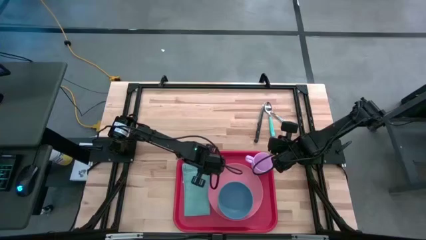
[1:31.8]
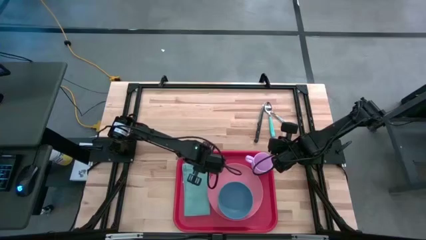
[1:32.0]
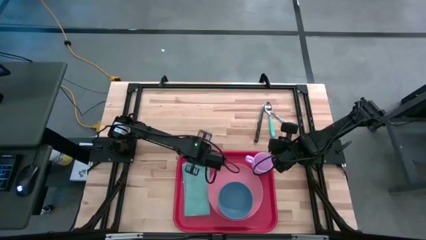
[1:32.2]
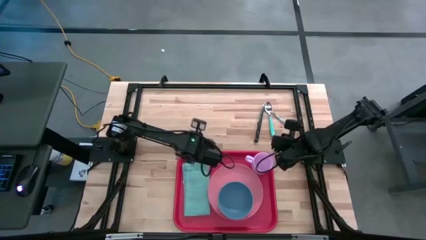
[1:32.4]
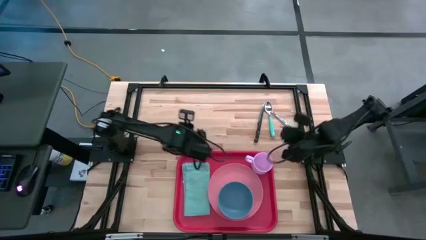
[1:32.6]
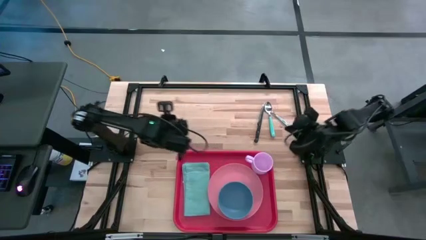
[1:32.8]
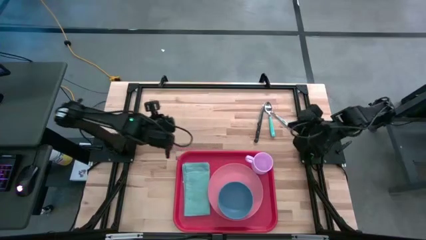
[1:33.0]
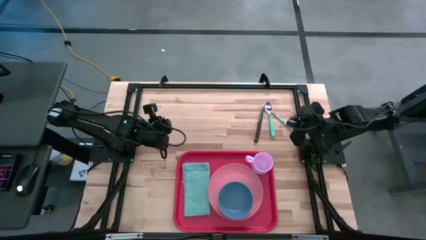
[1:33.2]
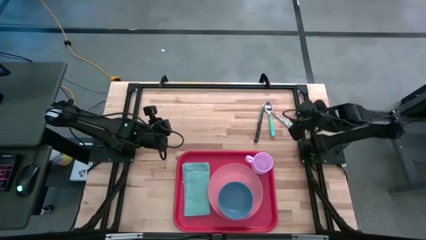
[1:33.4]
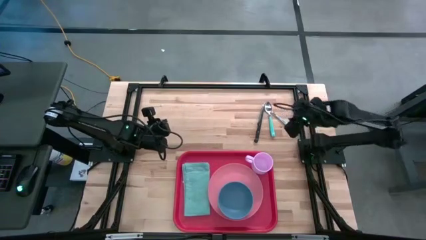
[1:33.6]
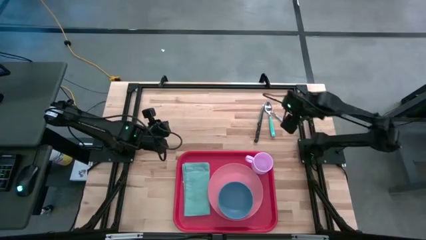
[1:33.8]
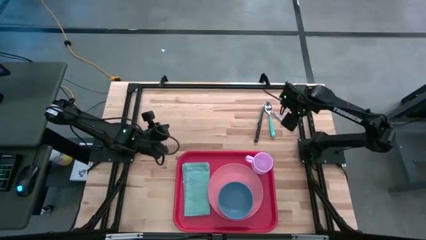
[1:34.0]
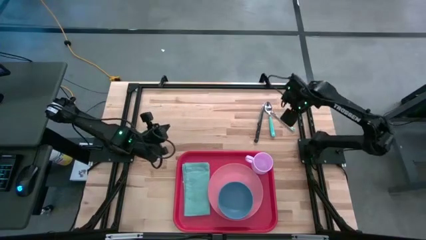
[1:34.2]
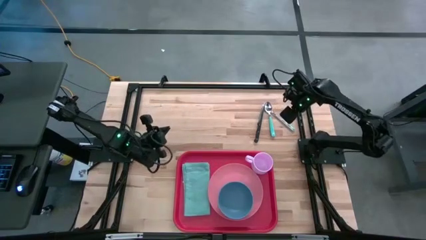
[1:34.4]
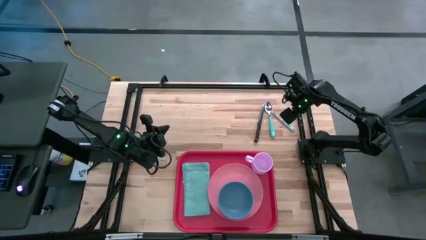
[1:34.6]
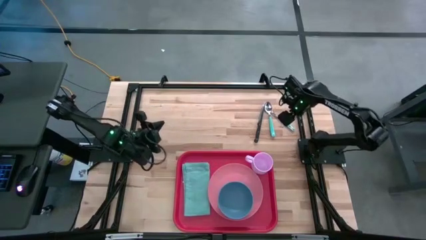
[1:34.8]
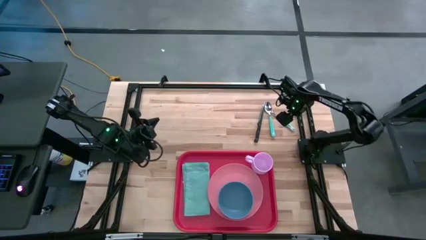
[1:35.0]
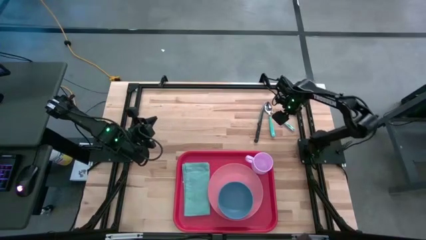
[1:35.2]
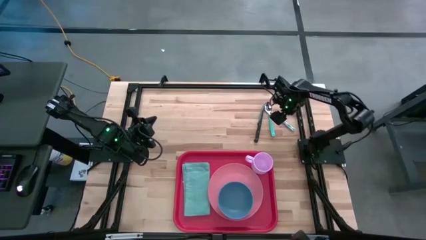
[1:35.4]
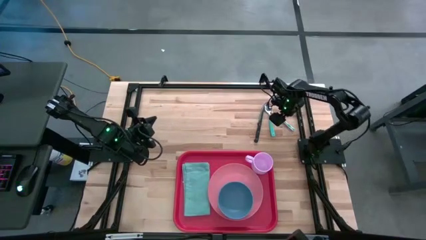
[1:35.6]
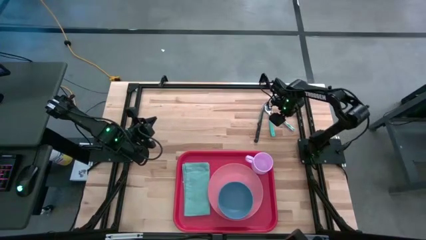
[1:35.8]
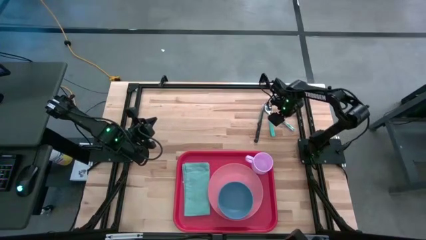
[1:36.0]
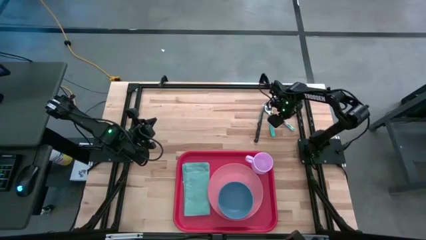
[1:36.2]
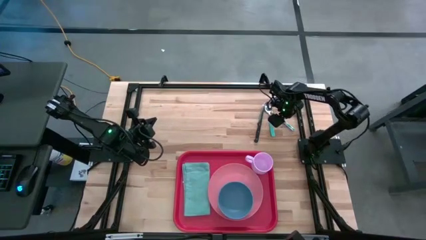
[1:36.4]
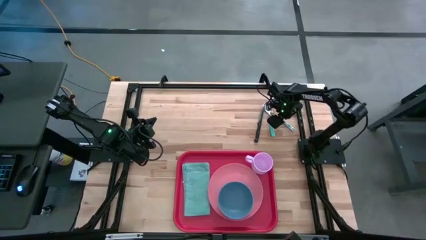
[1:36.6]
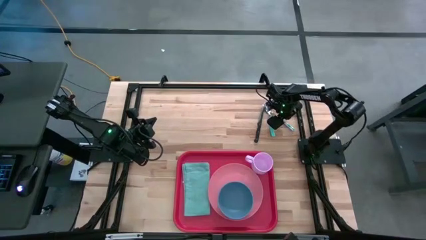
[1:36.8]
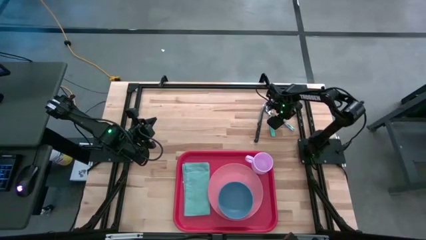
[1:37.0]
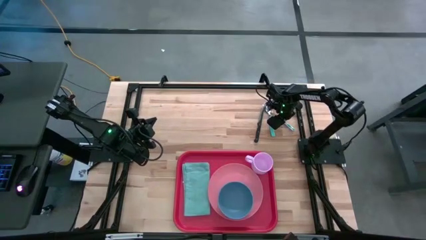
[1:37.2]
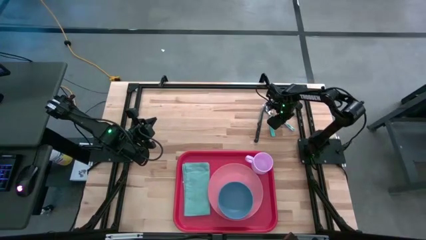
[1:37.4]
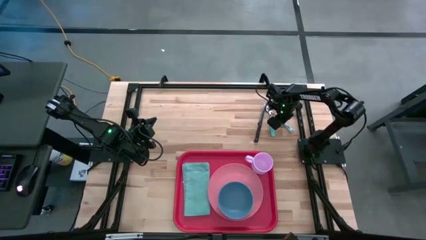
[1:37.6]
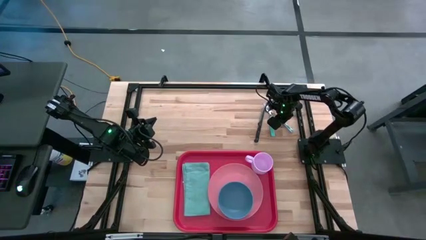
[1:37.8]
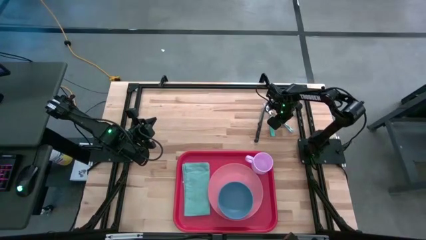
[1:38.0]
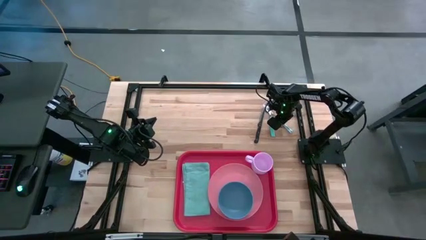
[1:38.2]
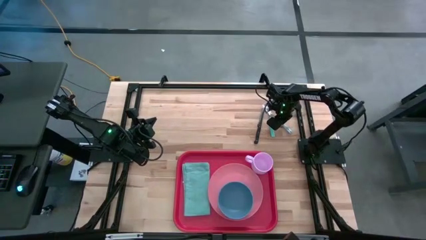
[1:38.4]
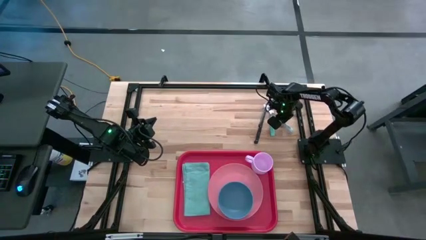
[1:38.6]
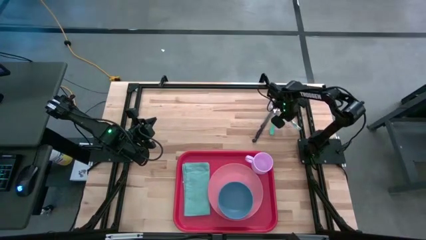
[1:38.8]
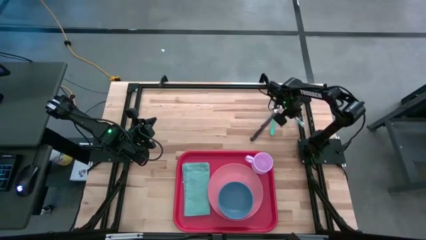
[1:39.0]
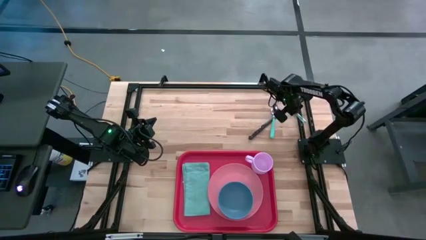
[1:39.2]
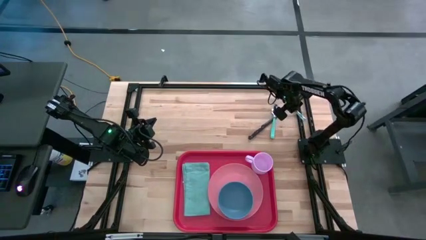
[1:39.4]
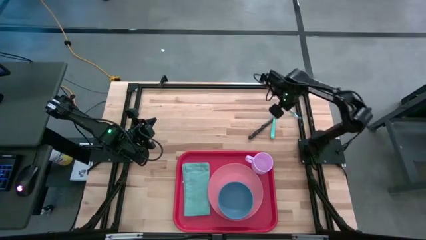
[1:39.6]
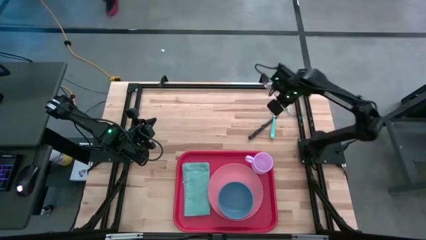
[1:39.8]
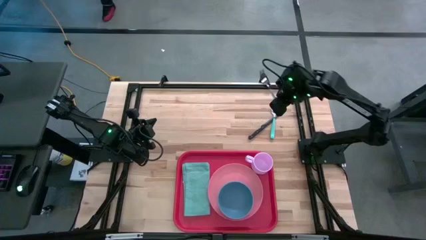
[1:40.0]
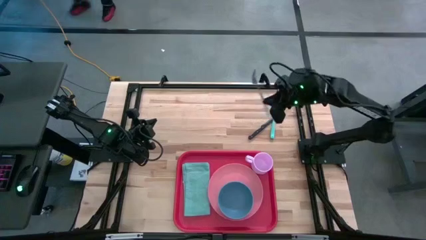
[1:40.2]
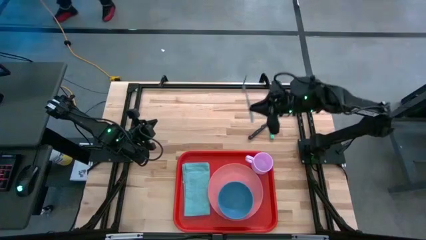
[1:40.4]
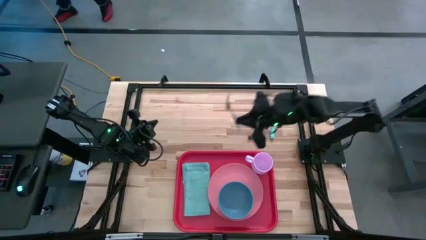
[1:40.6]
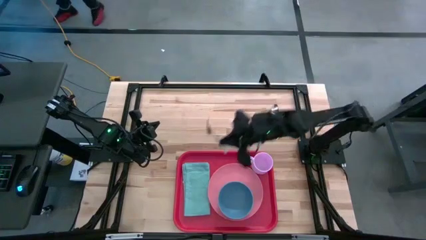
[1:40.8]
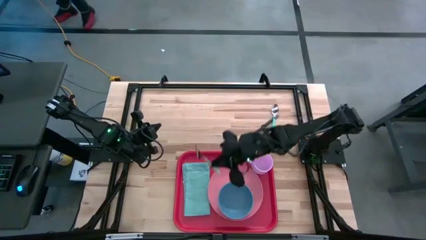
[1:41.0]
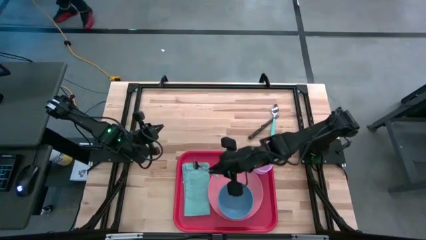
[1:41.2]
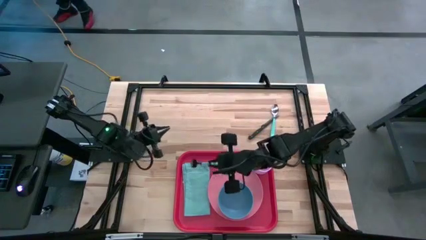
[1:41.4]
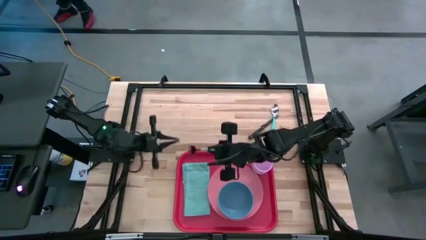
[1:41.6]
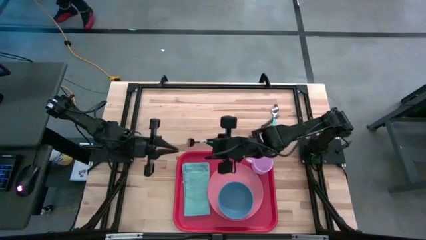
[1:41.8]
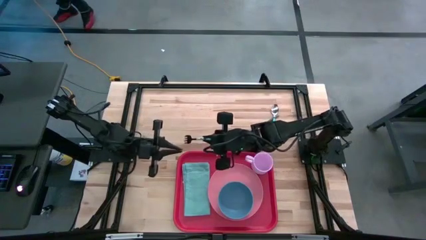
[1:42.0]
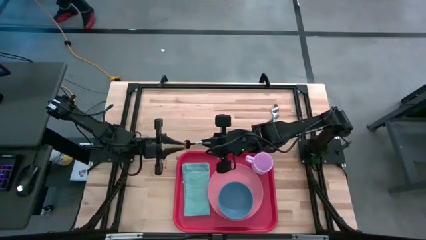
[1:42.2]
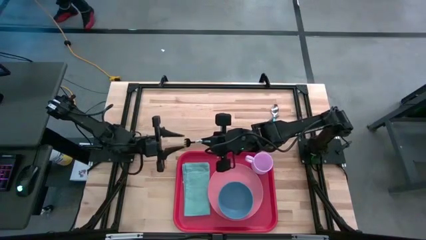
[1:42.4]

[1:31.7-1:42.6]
Task: Set up tray
Put the blue fork on the blue napkin

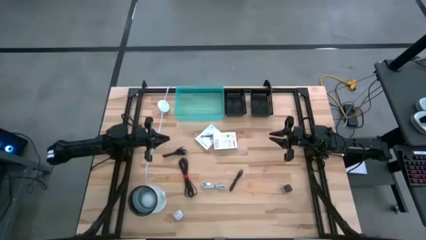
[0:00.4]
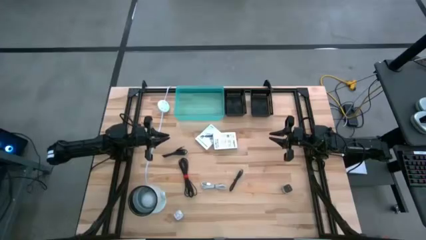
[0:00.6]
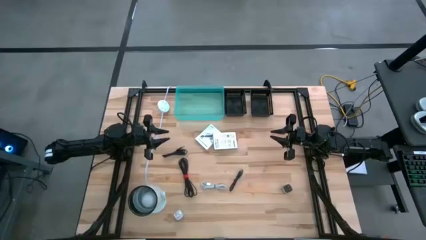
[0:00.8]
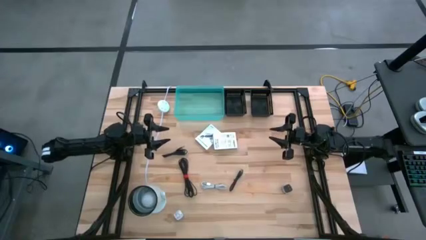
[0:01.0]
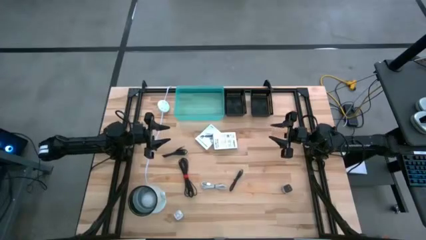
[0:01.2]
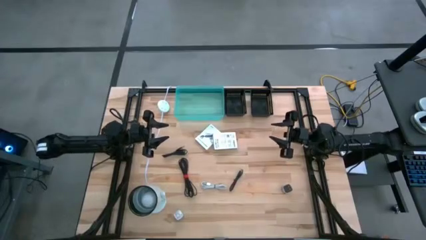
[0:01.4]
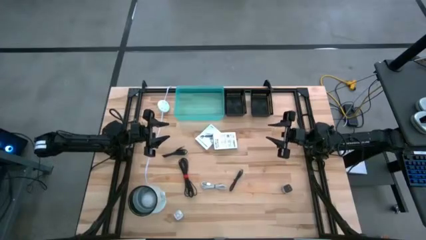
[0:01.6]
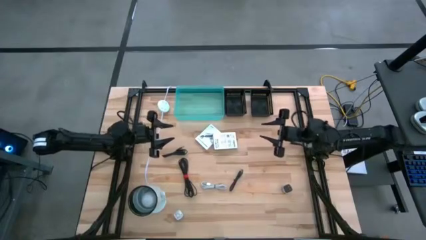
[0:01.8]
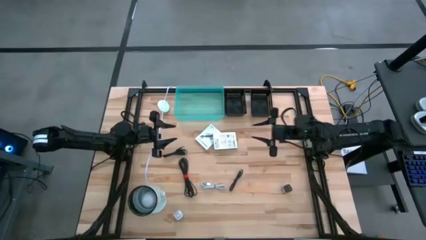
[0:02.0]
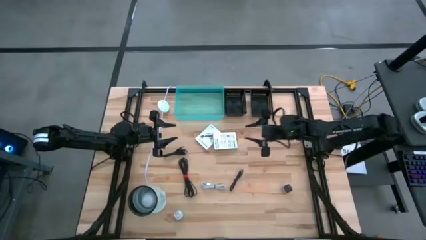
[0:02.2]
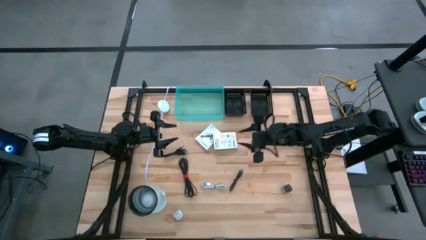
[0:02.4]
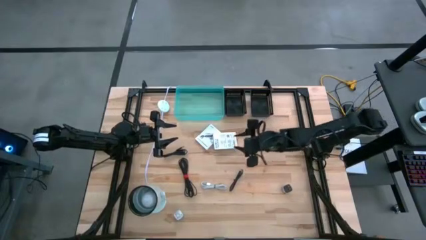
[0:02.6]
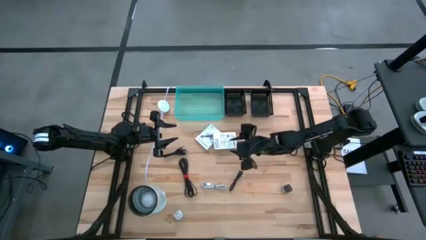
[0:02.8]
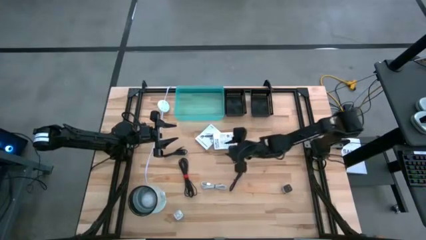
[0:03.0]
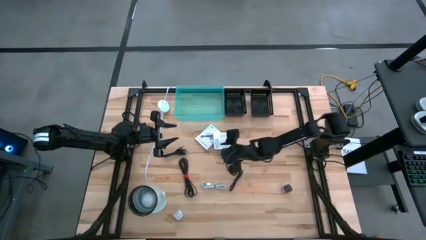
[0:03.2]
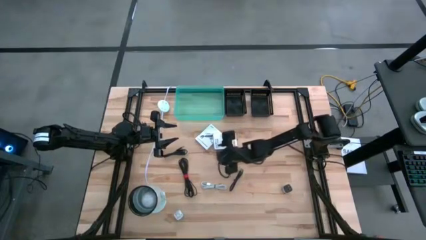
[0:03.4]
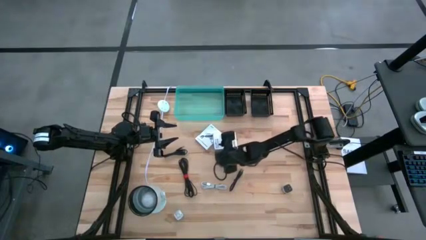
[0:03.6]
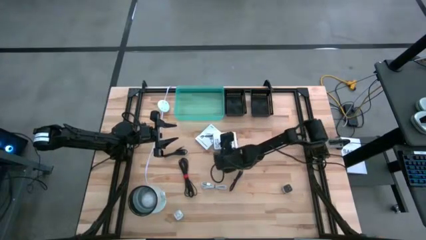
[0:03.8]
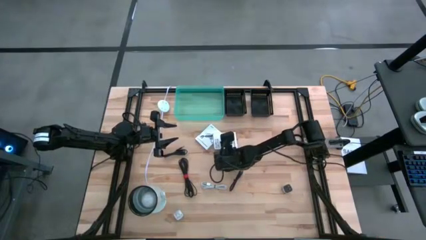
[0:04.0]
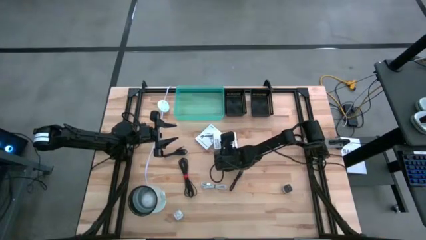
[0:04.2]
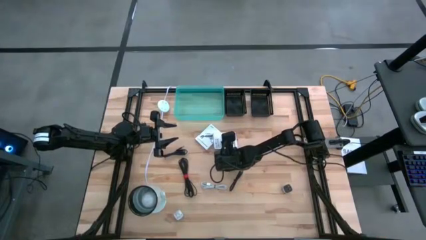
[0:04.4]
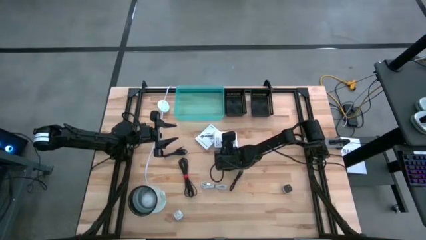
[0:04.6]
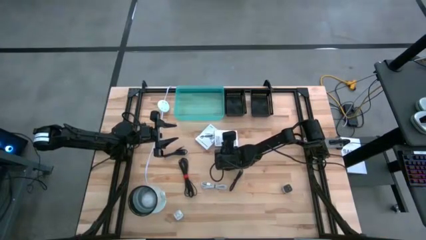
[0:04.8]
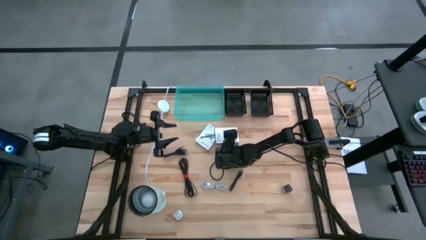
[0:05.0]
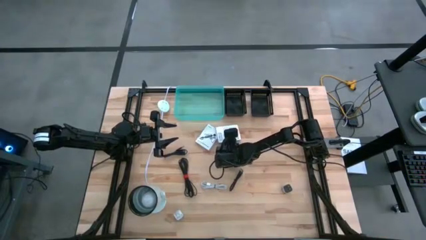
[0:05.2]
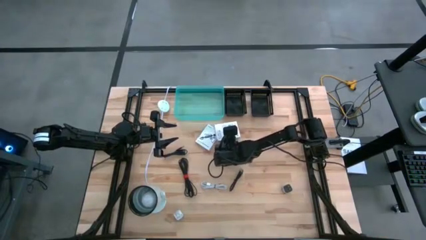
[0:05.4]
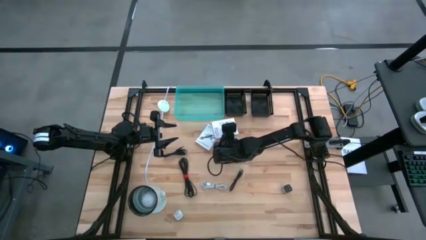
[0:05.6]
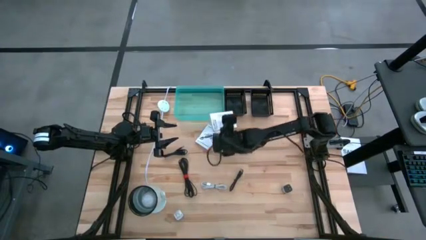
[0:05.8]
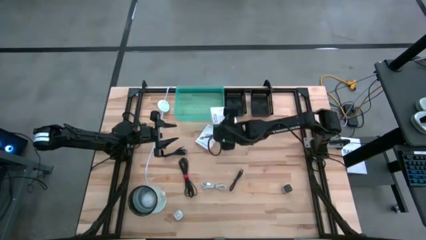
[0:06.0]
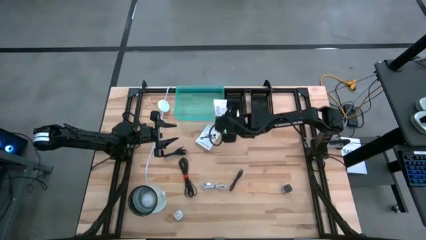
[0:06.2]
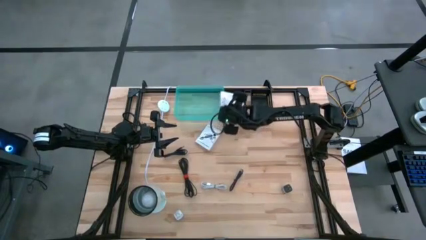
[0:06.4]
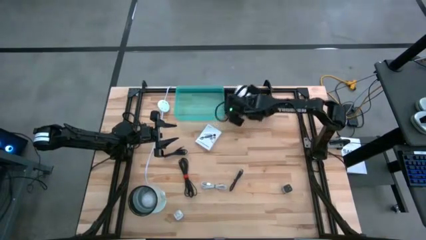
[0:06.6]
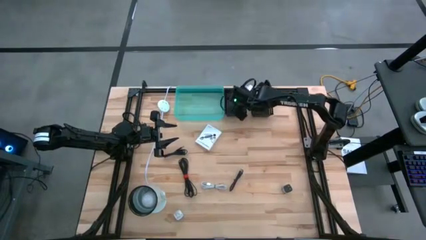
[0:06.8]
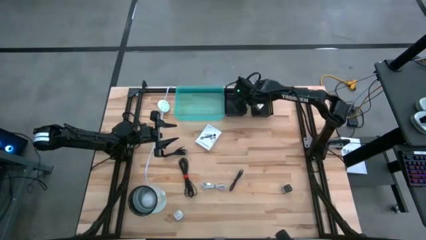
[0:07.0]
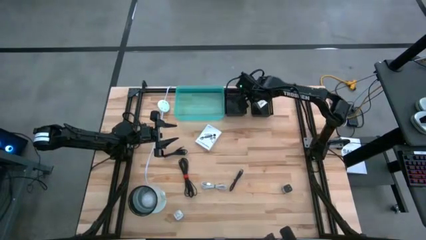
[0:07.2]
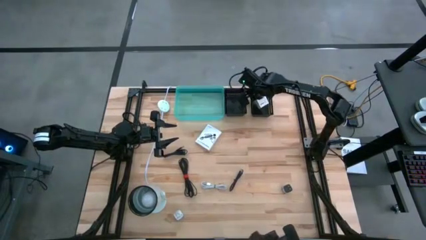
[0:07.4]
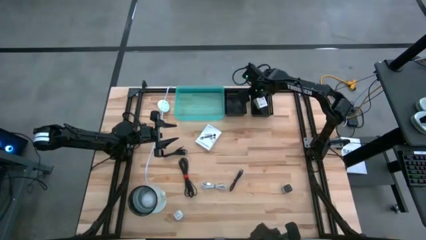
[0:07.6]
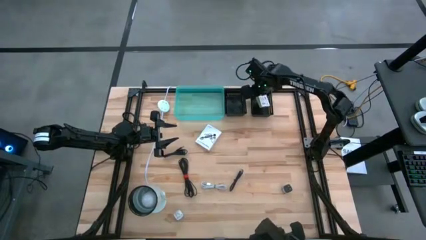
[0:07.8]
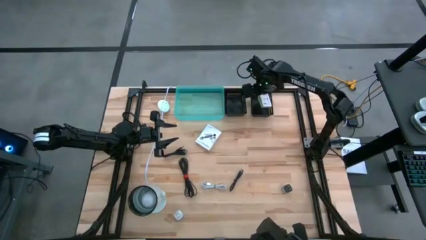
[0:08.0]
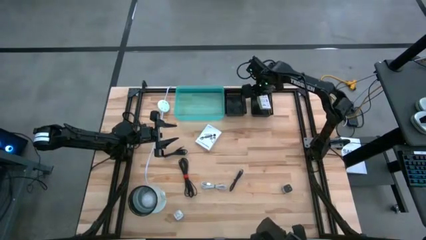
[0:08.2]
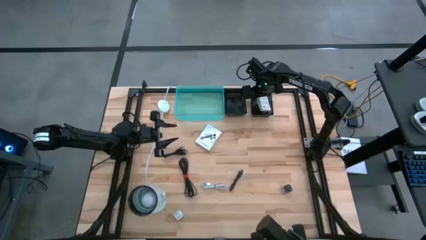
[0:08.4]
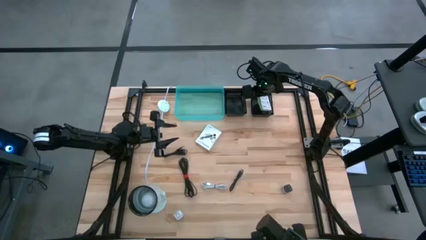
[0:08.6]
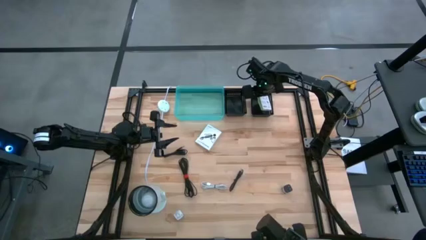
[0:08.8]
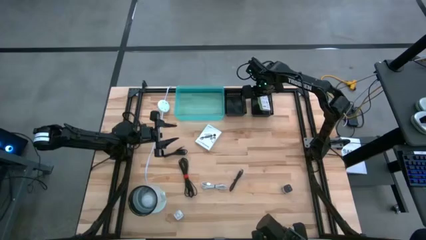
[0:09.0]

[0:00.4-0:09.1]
Task: Pick and place items into bin
Put the right card reader box into the right black bin
